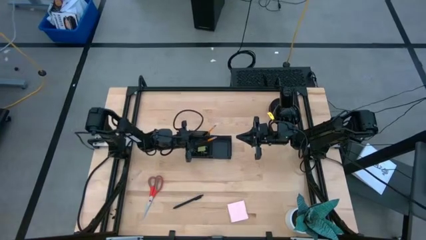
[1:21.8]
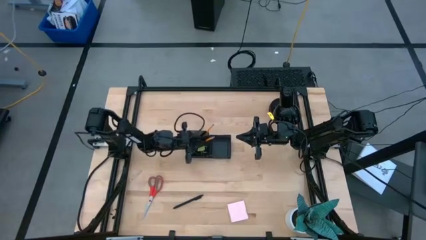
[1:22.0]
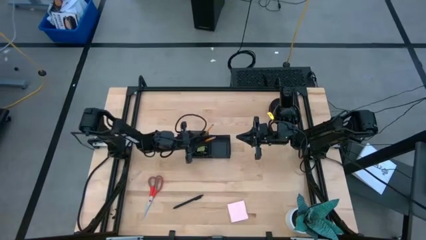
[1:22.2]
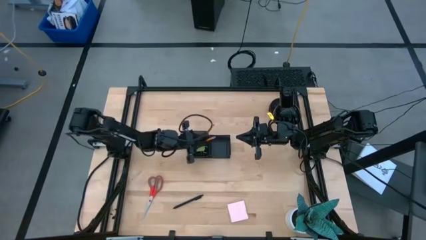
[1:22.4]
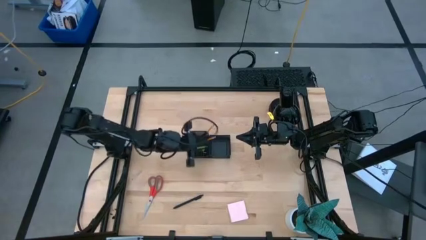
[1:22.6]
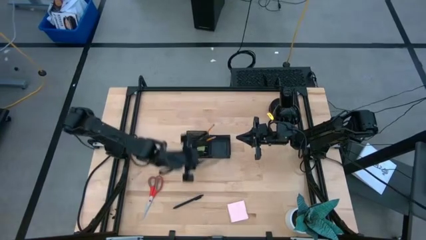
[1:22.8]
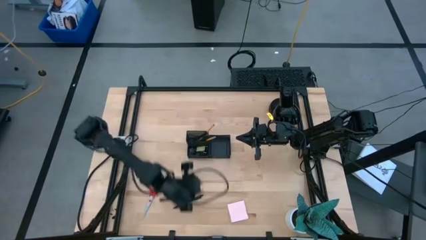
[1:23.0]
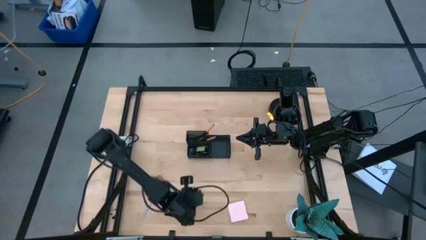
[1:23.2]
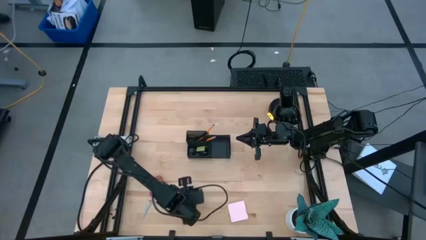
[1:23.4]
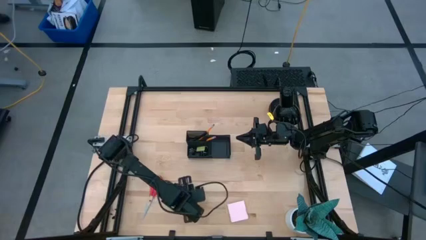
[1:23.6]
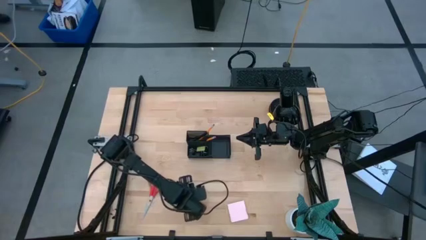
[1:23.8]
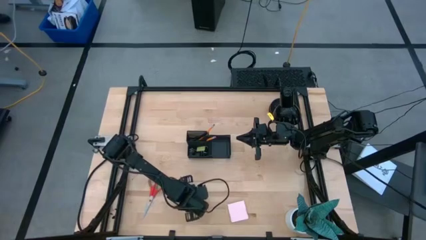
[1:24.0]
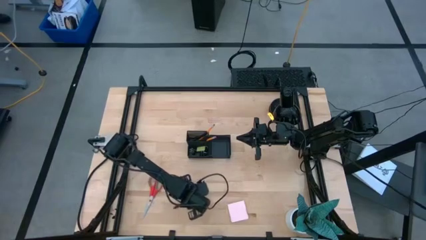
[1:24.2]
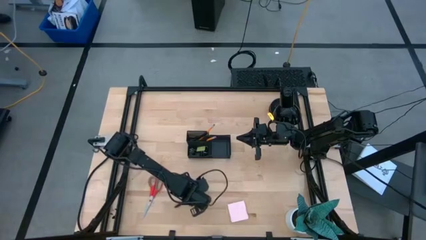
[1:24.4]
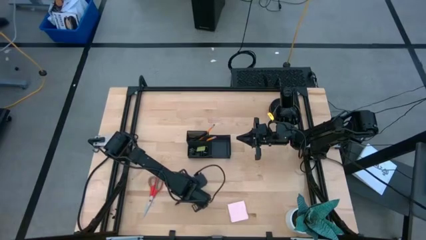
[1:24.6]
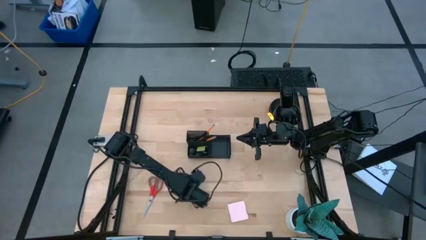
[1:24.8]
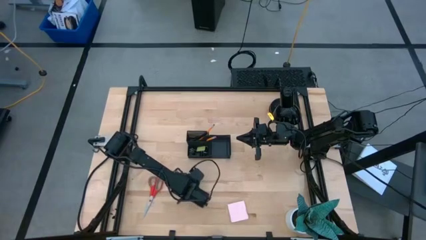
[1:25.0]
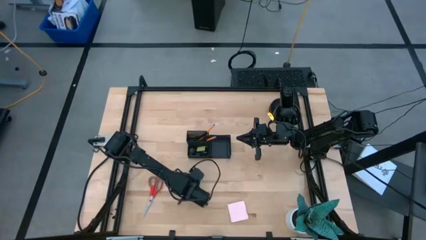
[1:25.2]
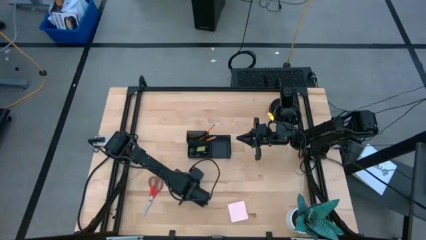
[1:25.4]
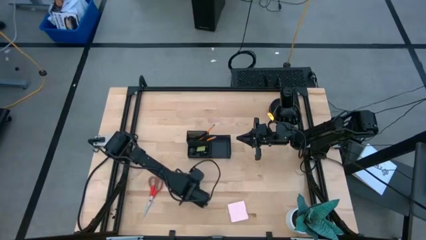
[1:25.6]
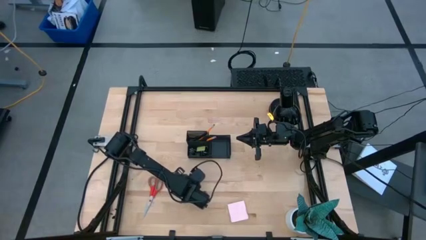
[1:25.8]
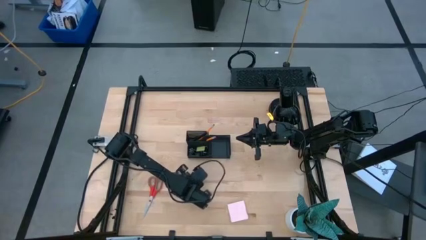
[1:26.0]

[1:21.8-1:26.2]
Task: Pick and place office supplies into organizer
Put the black pen into the black desk organizer

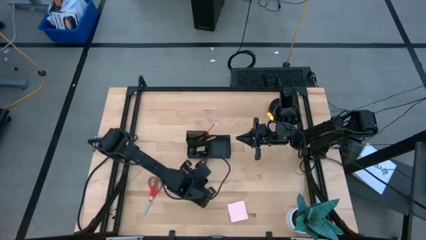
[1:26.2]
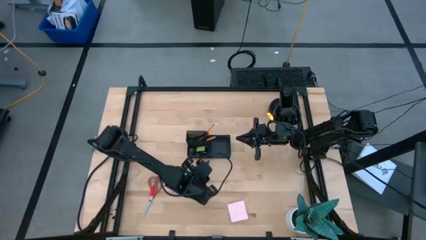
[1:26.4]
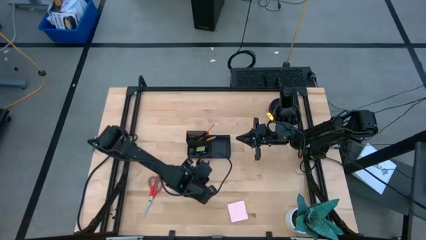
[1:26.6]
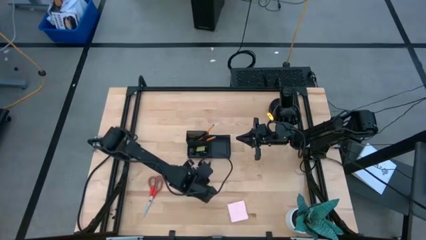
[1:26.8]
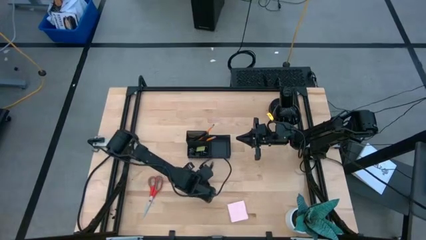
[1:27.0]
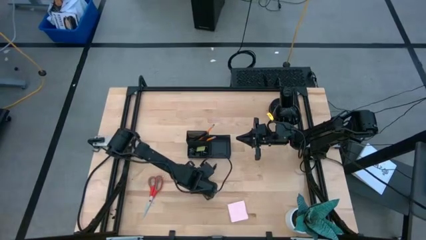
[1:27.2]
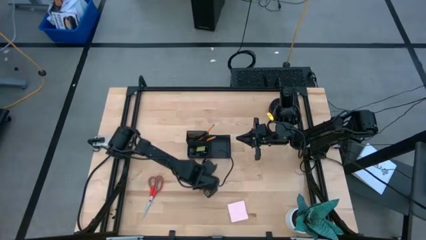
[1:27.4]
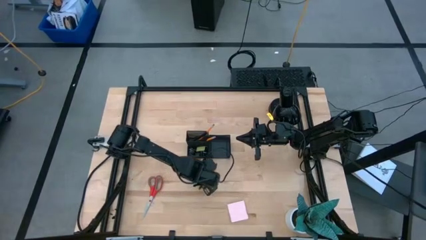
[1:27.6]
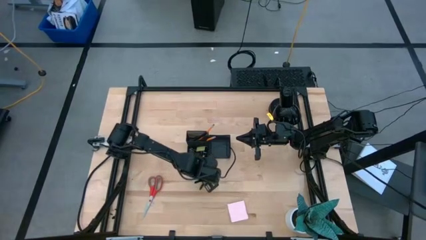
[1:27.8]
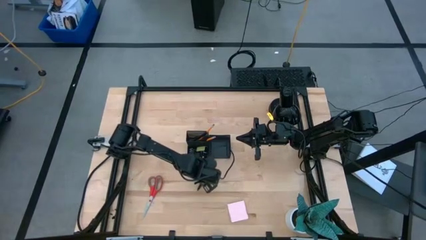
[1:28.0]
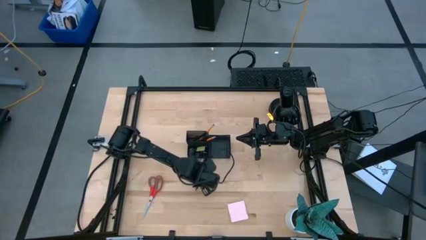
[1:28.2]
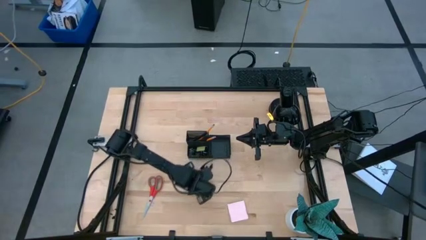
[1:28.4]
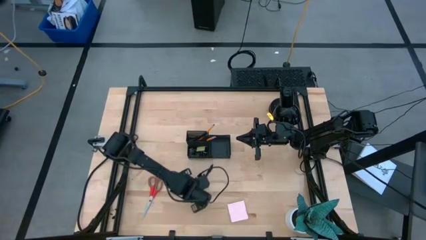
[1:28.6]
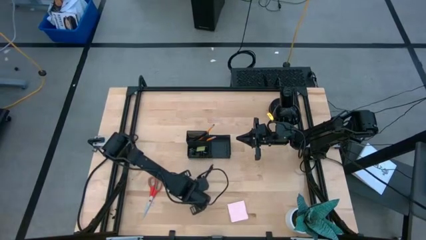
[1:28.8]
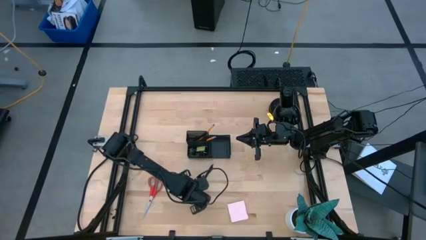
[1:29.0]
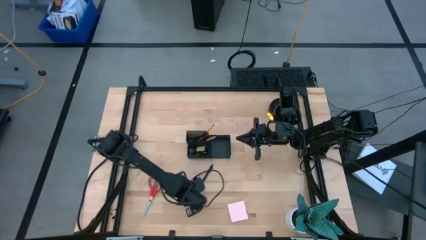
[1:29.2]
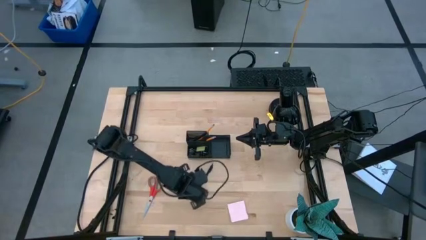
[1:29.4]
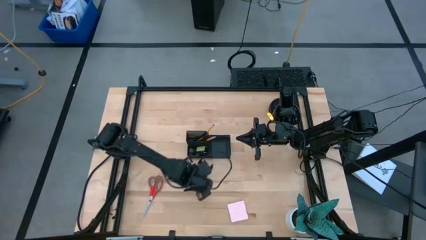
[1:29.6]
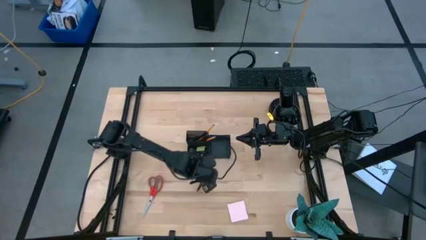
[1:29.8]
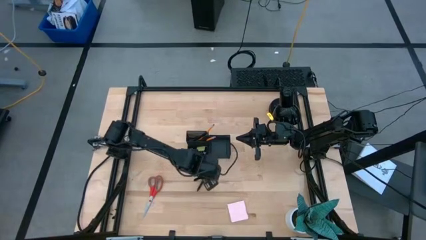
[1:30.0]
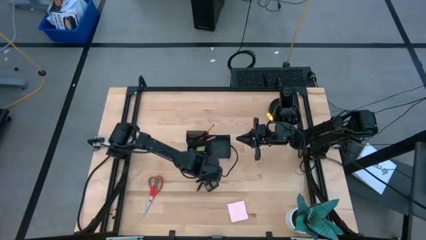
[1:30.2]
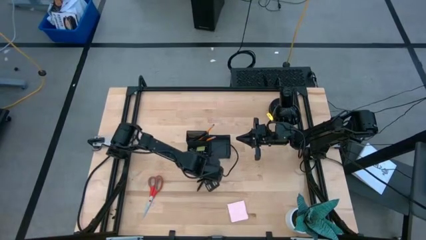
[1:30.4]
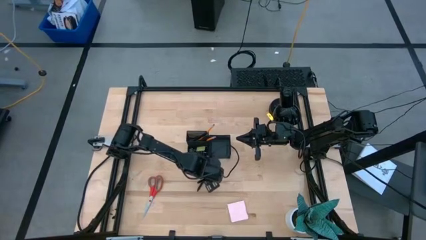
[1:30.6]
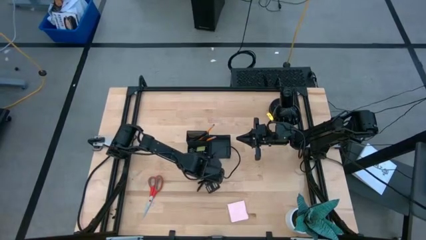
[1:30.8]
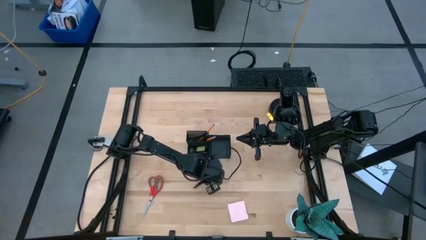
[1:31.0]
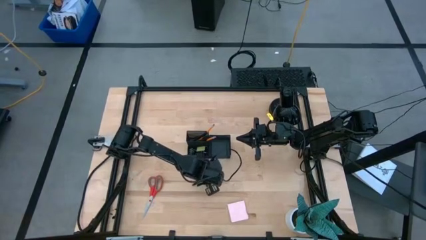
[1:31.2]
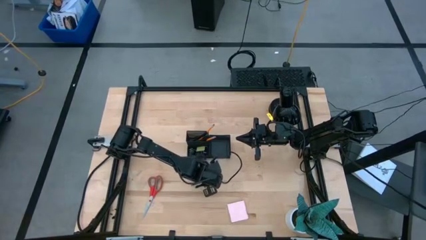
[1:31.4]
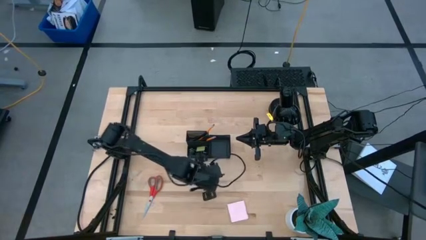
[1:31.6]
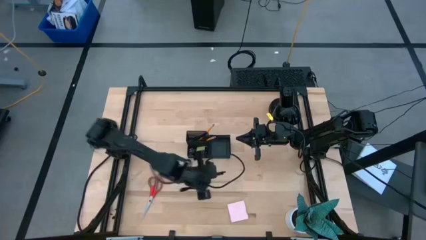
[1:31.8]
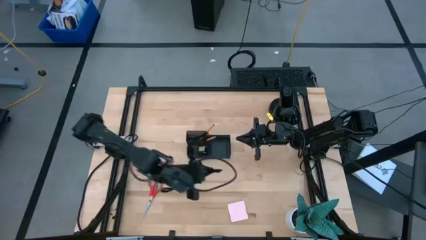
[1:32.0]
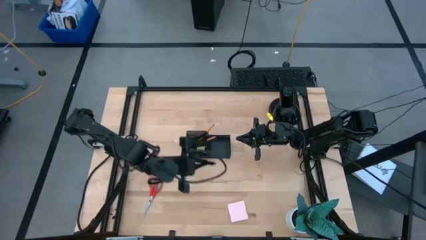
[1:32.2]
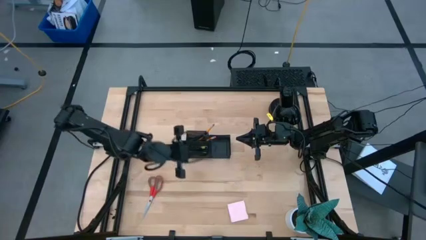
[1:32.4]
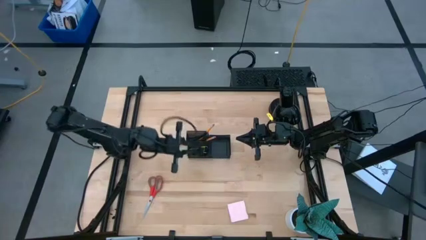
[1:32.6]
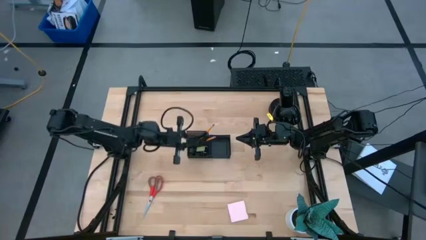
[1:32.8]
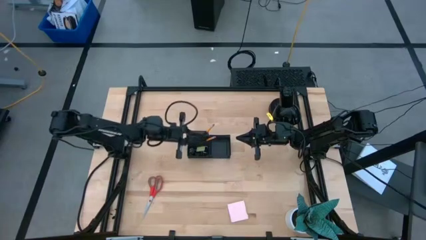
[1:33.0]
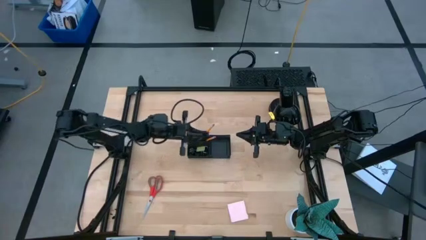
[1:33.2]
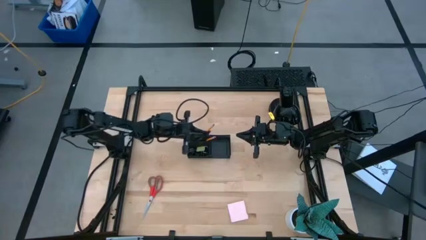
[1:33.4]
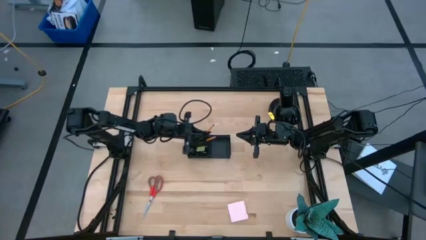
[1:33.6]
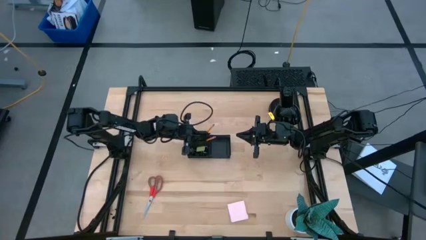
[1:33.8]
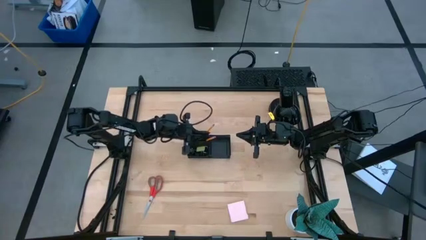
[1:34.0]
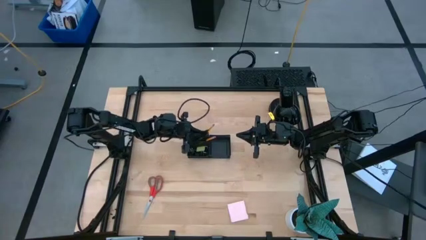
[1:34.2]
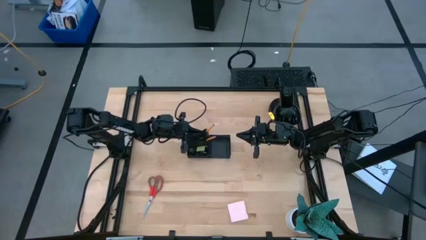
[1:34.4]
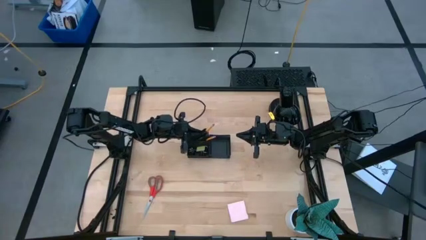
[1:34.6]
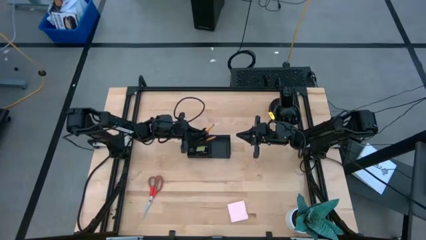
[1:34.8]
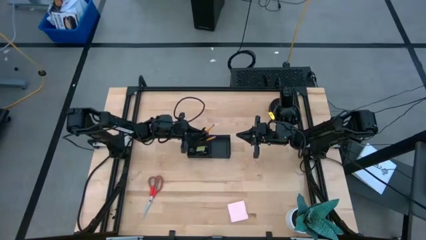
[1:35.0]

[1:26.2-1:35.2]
Put the black pen into the black desk organizer
